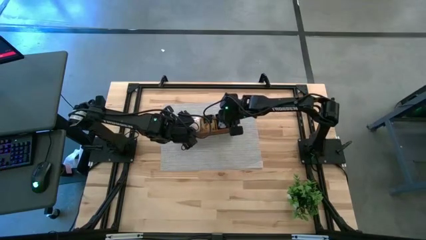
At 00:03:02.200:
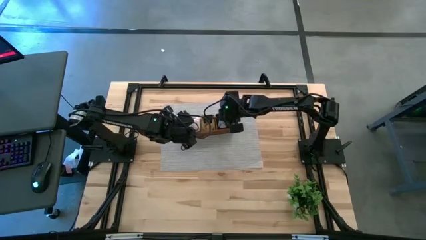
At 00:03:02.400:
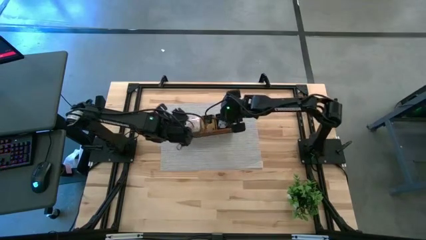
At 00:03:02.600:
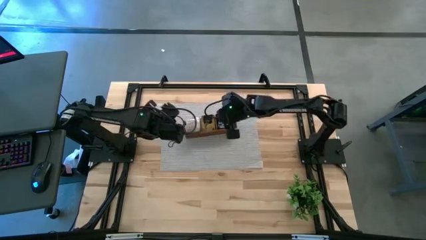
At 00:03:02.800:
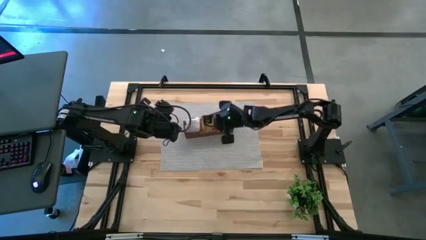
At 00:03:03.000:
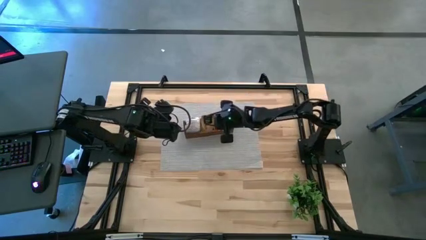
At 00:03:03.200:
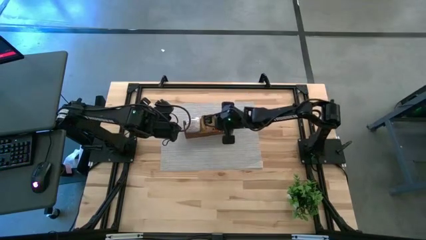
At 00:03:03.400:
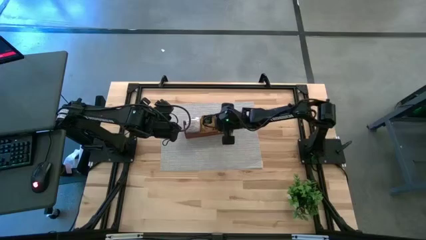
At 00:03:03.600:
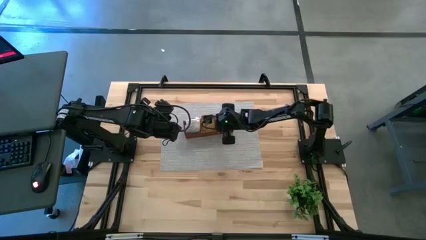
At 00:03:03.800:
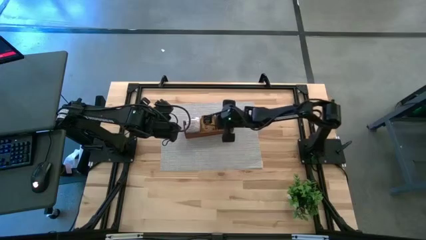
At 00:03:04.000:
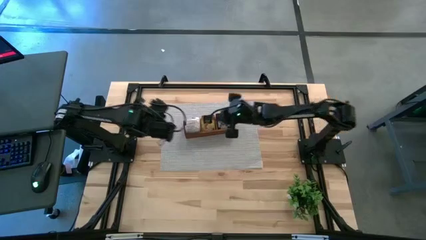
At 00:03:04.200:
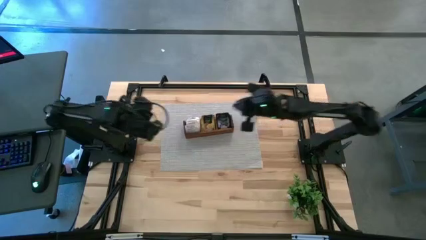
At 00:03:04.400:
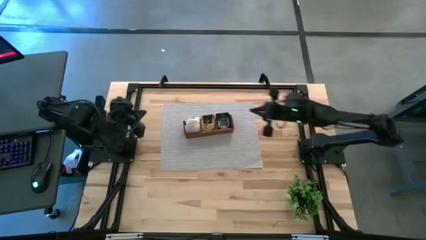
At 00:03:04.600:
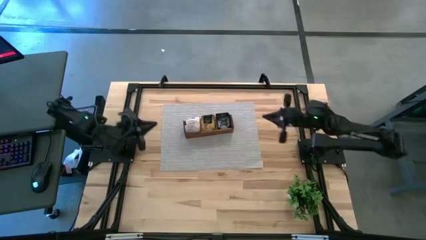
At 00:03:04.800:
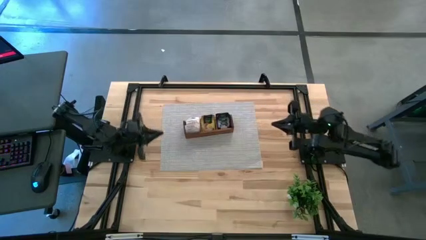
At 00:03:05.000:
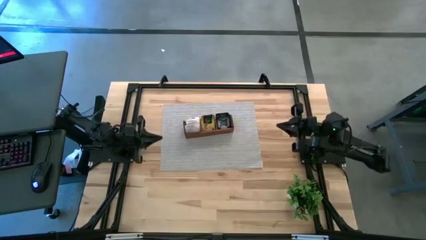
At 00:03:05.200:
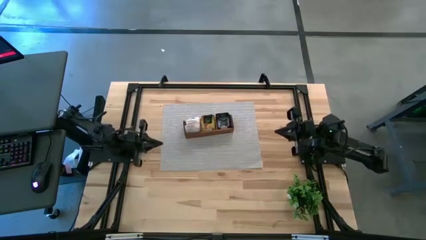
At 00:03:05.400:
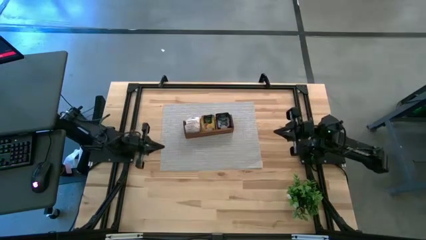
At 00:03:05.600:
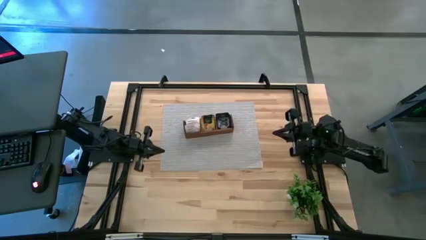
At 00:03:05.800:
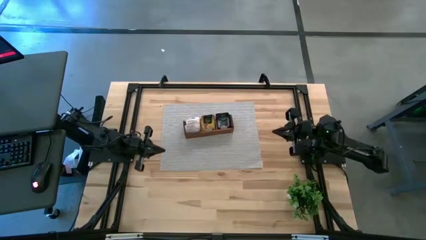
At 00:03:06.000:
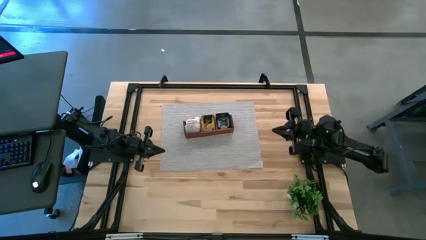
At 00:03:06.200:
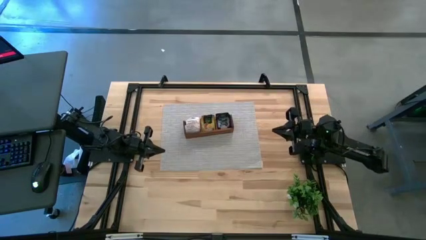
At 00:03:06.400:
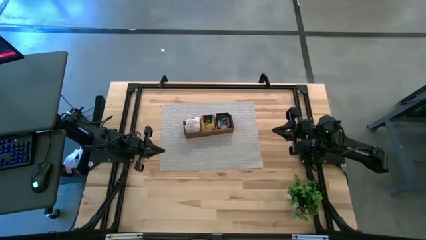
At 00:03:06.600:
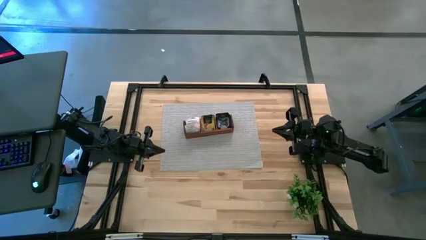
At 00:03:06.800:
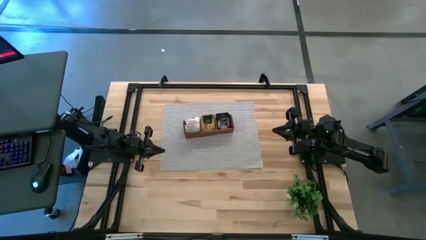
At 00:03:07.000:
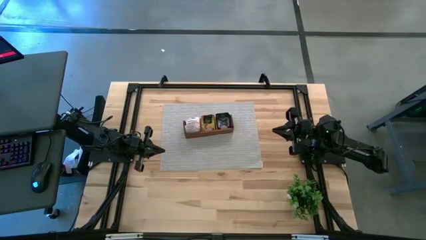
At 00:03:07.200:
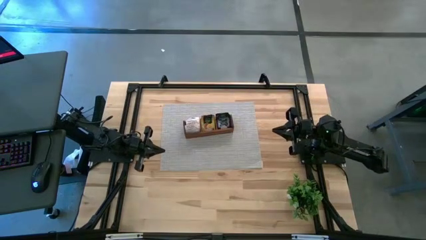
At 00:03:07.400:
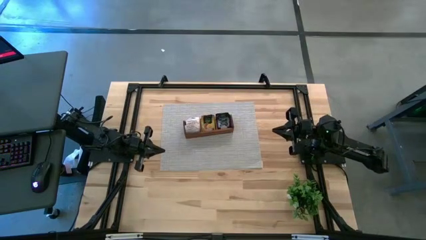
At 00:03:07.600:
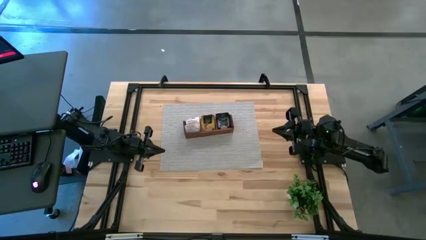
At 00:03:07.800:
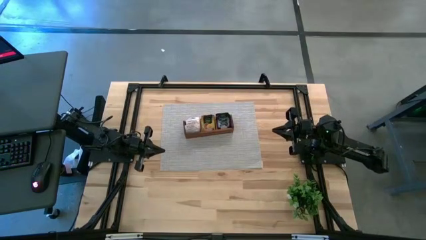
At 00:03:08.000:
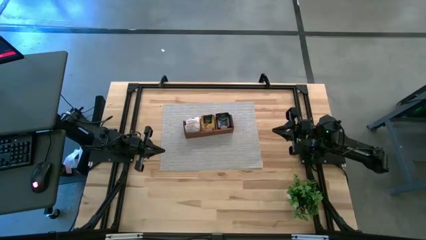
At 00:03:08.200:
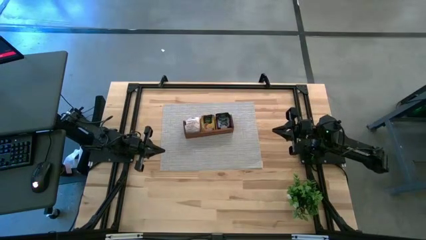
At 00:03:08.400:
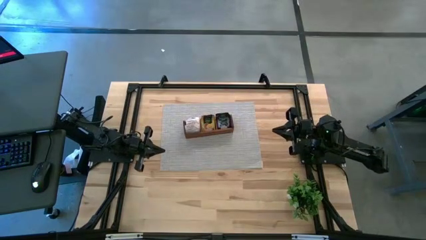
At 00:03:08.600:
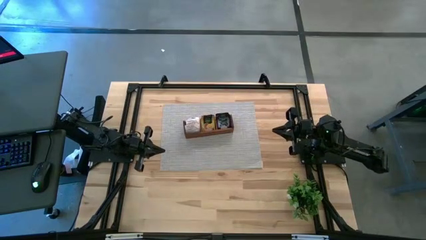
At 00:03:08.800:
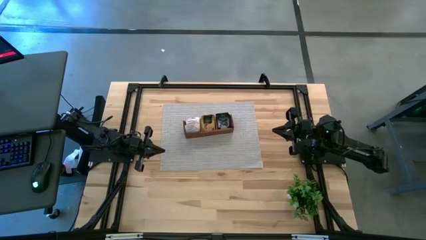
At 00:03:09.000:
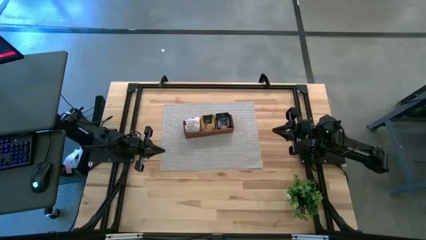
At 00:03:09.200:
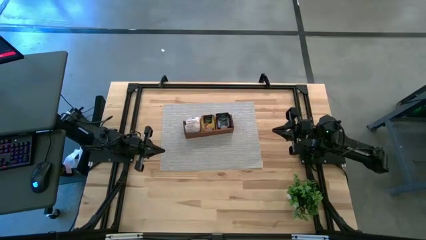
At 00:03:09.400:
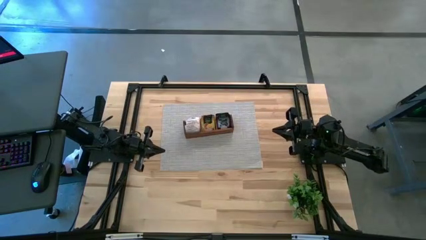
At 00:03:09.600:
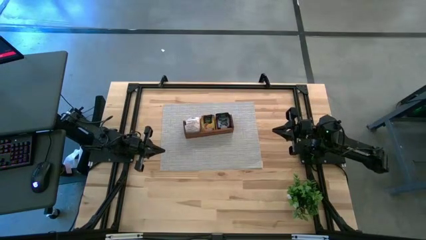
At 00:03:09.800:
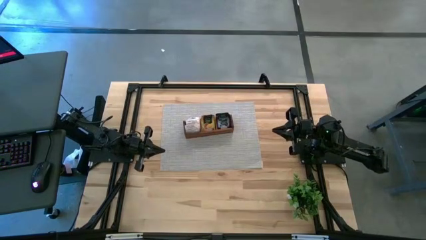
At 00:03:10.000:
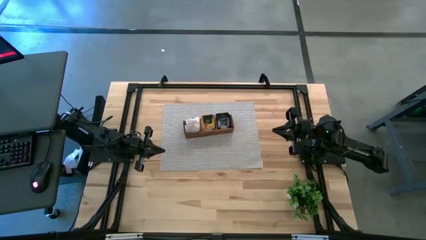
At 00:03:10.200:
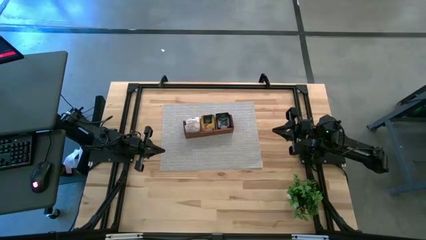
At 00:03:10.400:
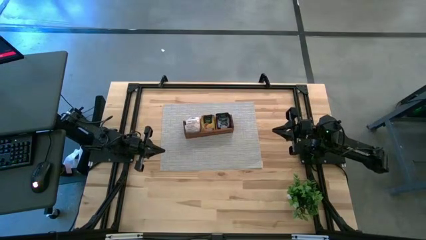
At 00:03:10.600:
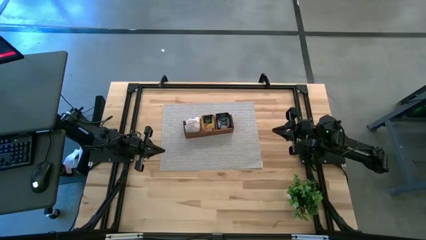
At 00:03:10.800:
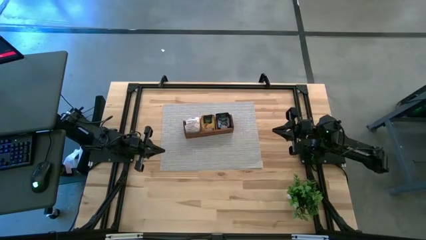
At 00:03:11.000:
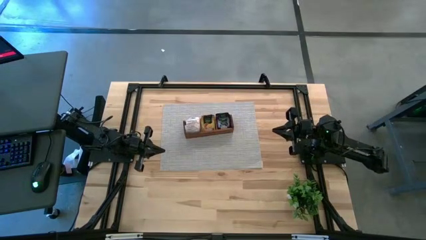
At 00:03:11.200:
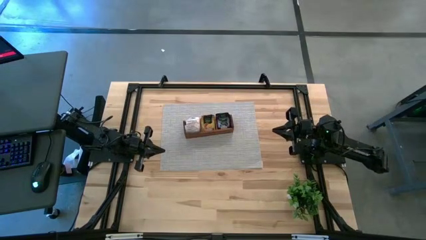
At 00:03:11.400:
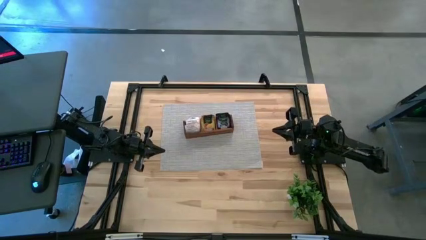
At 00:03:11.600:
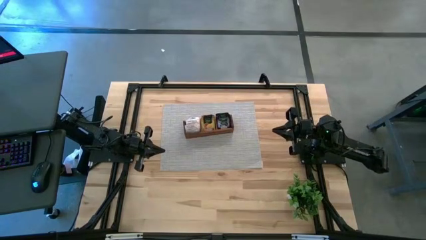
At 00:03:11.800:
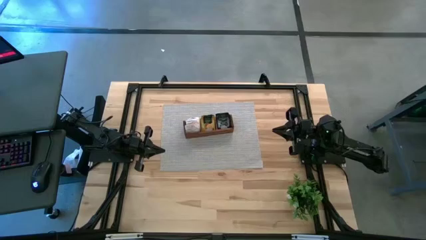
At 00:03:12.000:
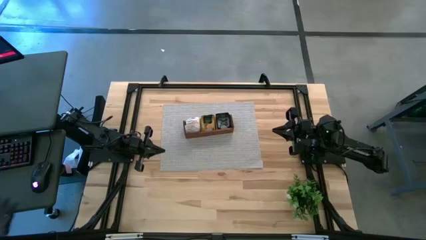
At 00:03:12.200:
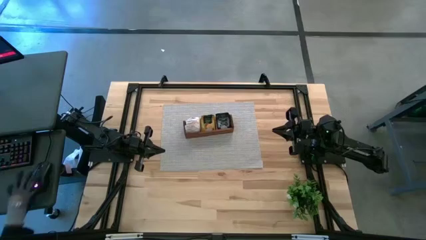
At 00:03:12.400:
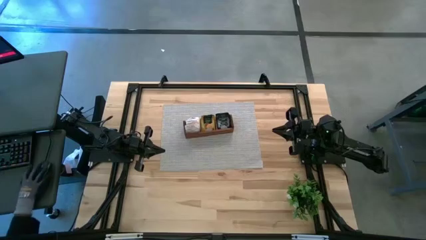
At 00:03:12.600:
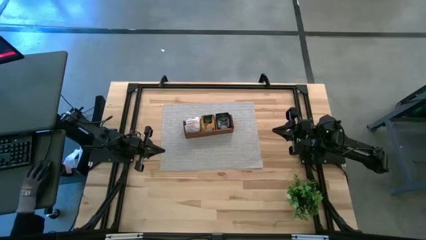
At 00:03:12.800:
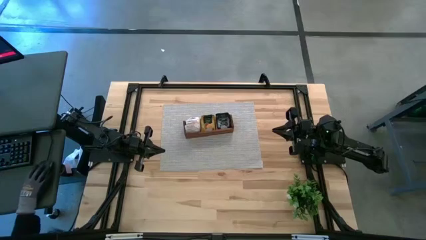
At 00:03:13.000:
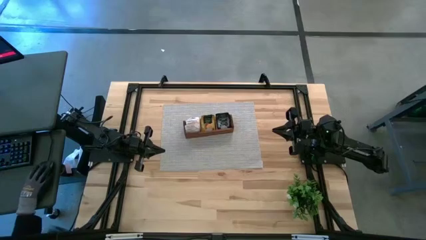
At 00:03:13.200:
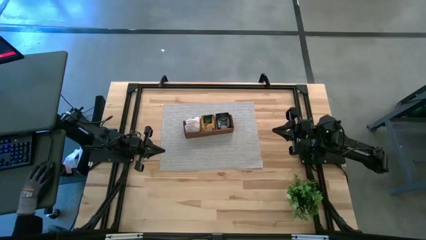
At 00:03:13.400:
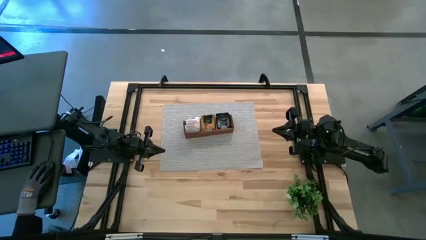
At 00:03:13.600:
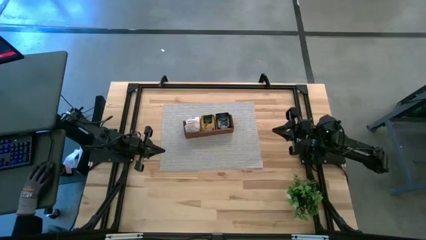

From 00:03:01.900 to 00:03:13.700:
Task: Pick & Place Tea
Return to Home Position

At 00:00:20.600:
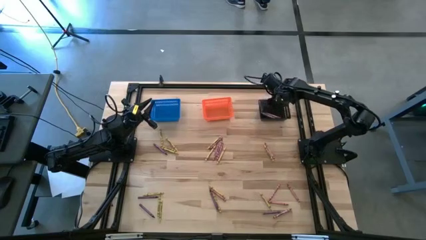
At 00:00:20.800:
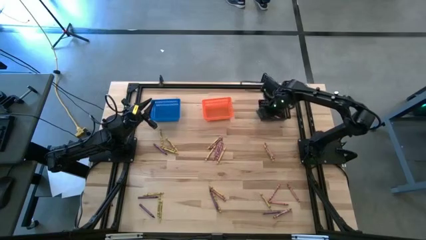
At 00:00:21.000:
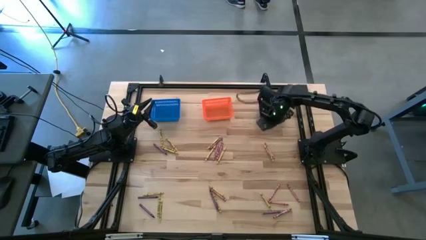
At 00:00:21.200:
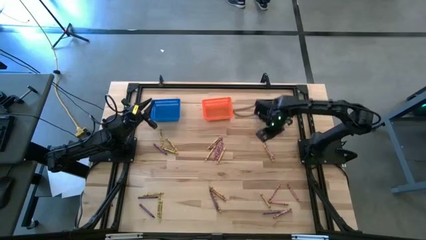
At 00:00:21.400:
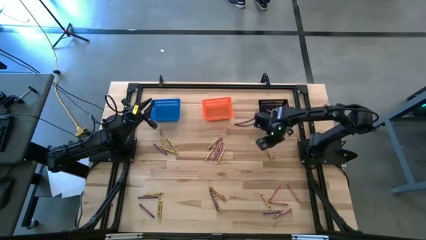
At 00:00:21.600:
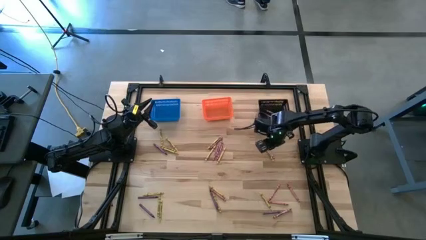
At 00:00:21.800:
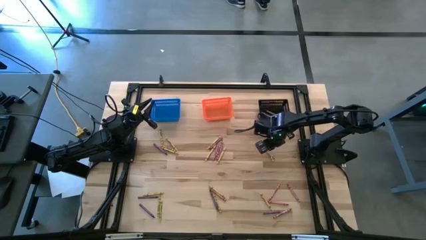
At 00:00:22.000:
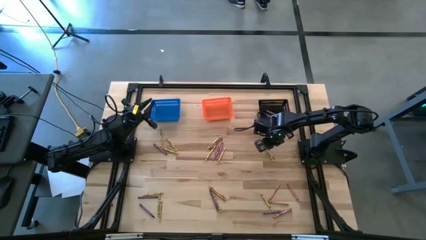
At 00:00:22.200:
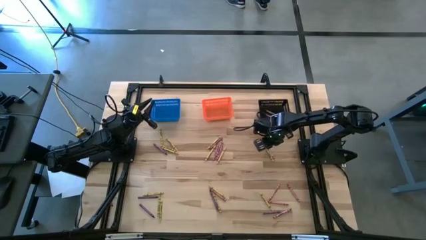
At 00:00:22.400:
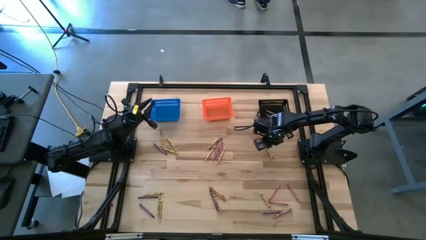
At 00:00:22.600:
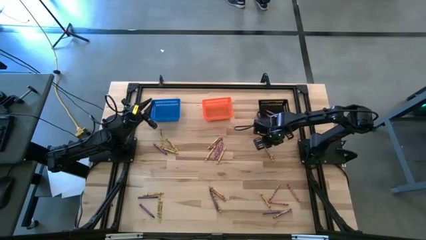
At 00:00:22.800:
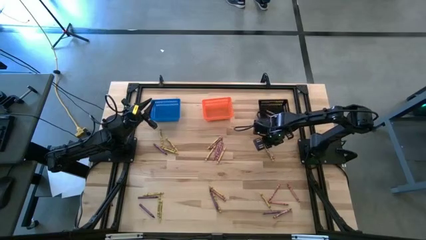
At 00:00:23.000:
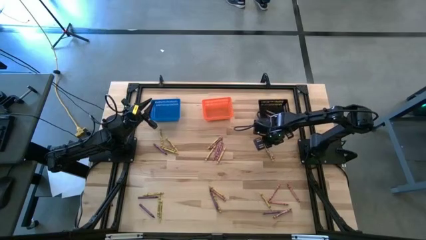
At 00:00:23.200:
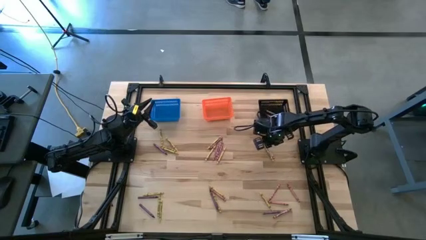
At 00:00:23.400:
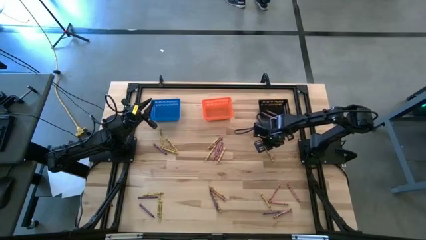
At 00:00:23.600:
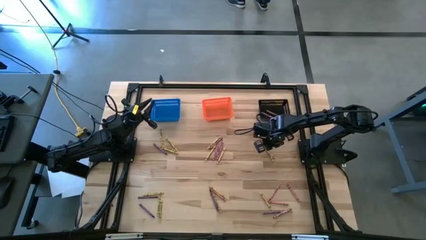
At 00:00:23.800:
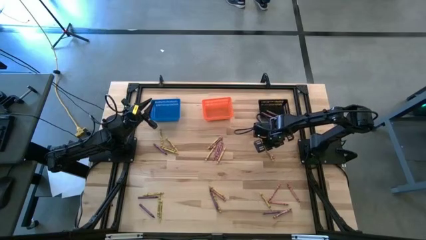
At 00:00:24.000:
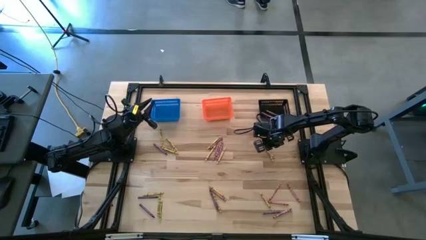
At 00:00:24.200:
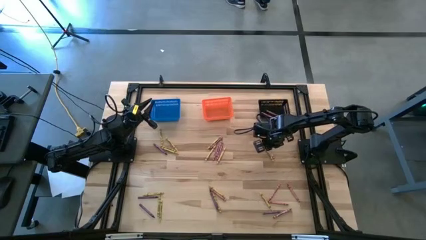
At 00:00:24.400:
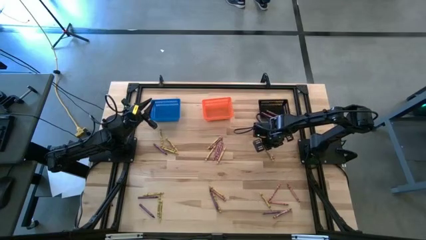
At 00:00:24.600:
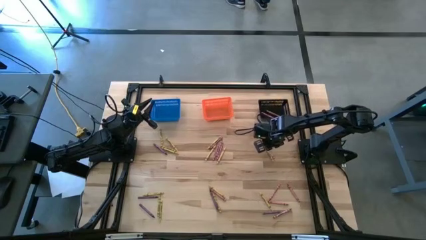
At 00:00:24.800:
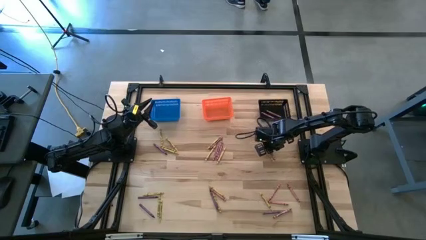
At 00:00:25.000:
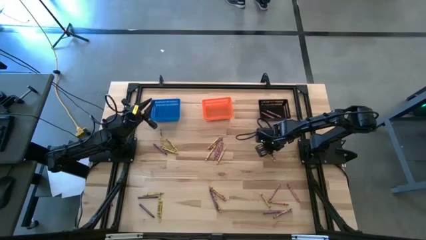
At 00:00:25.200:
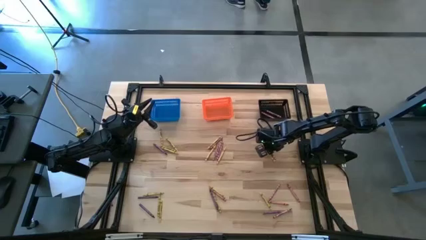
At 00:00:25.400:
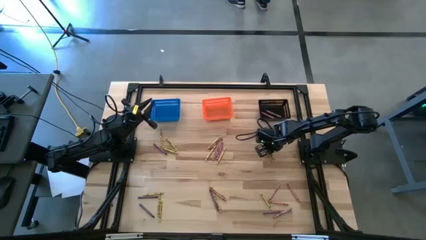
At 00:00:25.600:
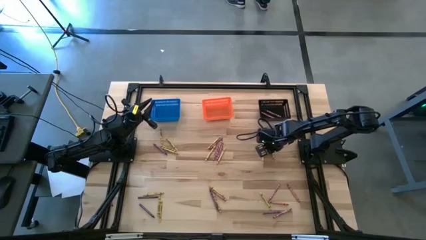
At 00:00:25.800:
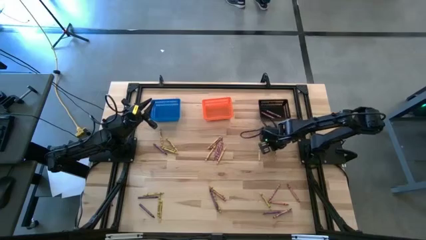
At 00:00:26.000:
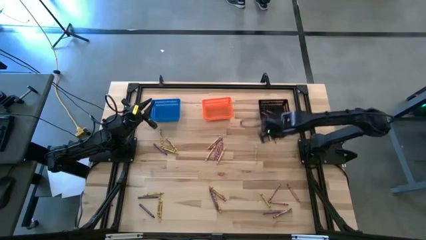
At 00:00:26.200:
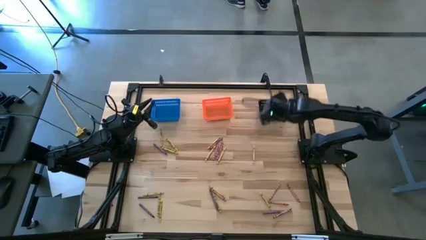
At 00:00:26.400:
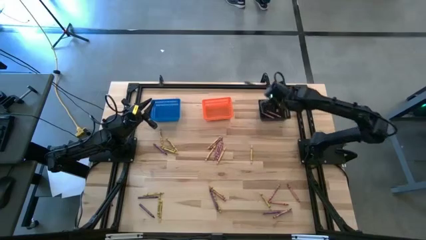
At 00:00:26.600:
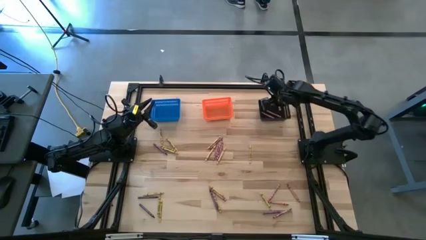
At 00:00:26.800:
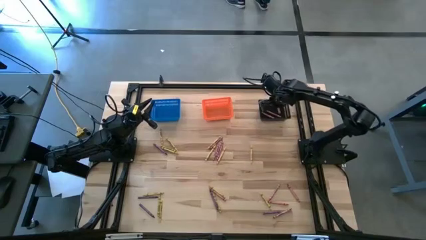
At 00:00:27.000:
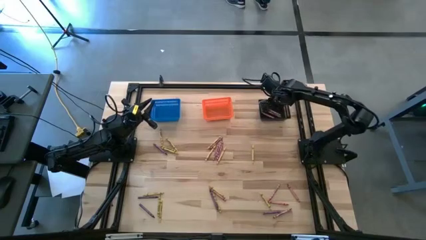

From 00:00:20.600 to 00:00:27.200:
Task: Sort crayons
Put the red crayon into the black bin
